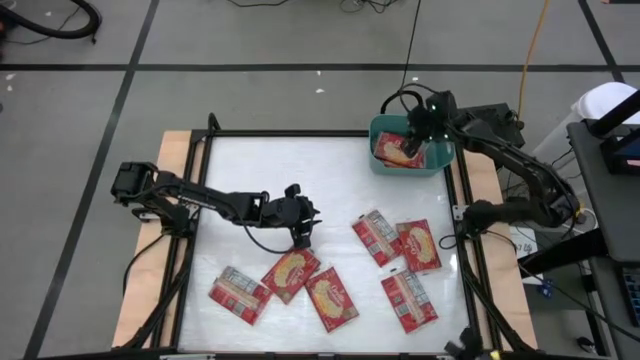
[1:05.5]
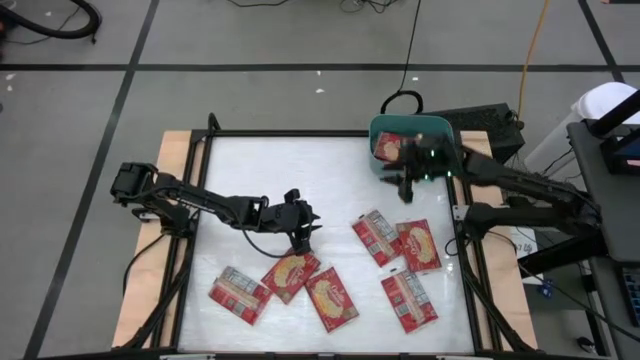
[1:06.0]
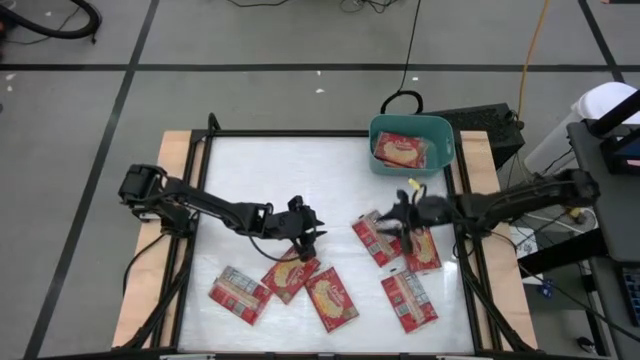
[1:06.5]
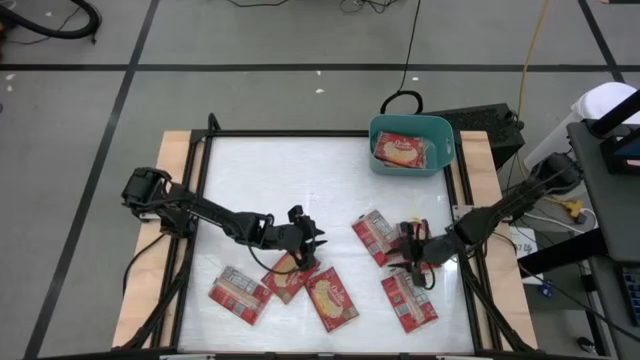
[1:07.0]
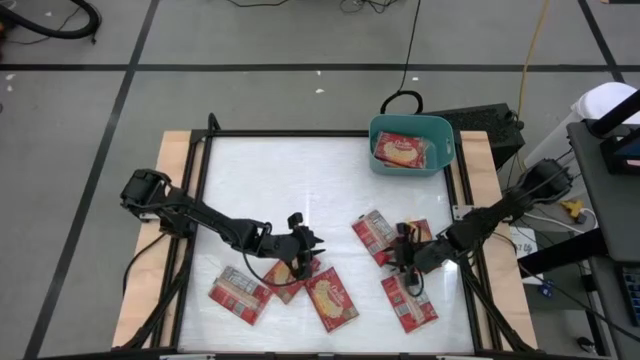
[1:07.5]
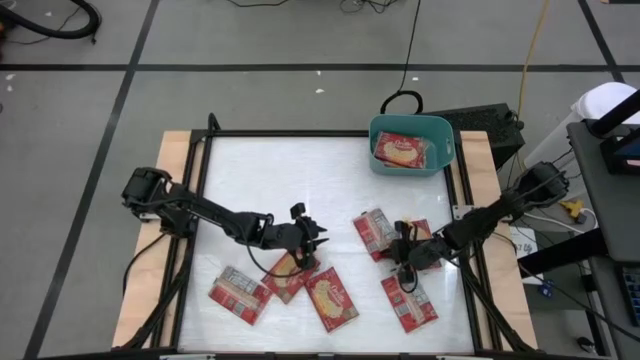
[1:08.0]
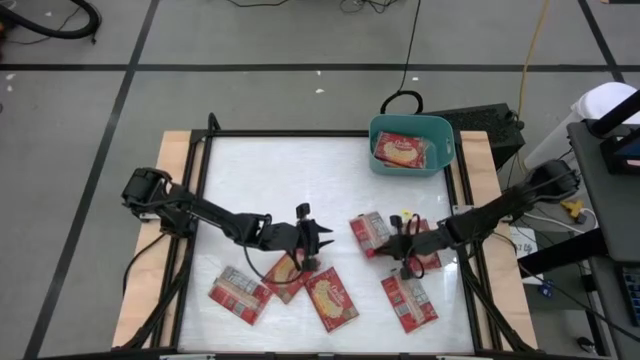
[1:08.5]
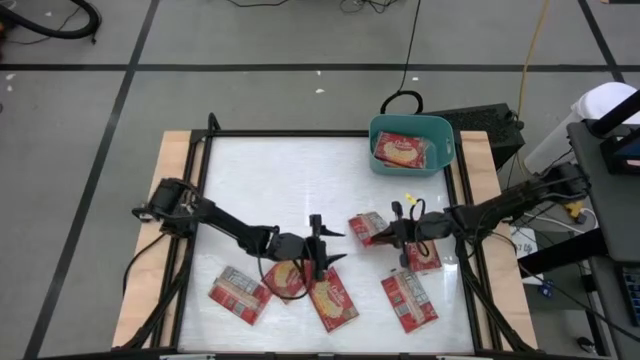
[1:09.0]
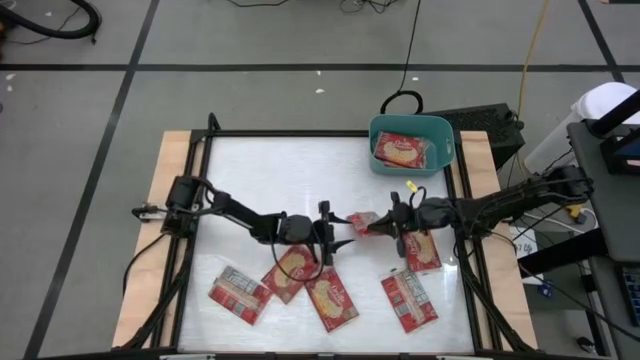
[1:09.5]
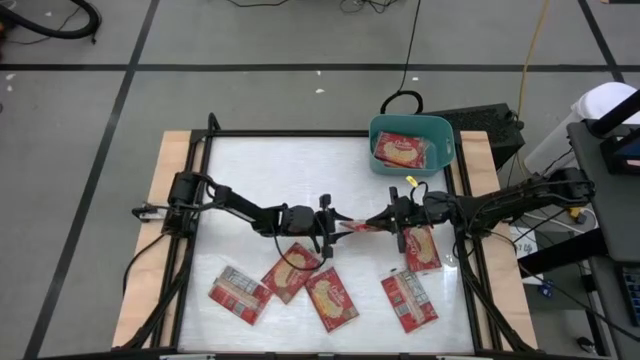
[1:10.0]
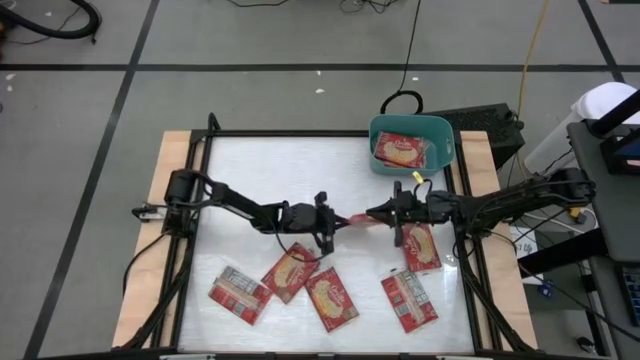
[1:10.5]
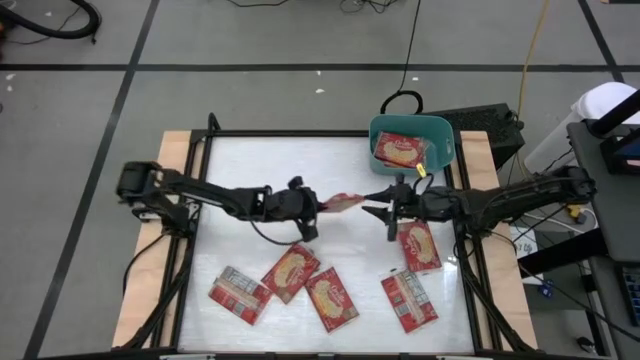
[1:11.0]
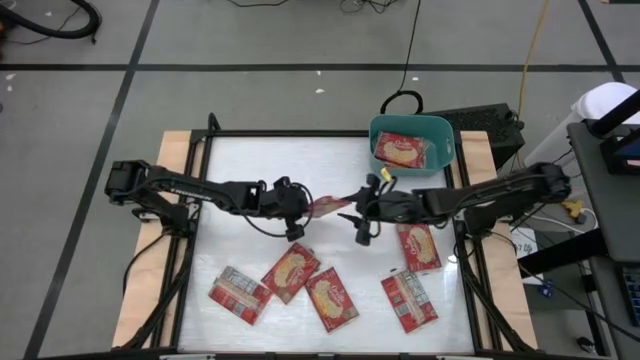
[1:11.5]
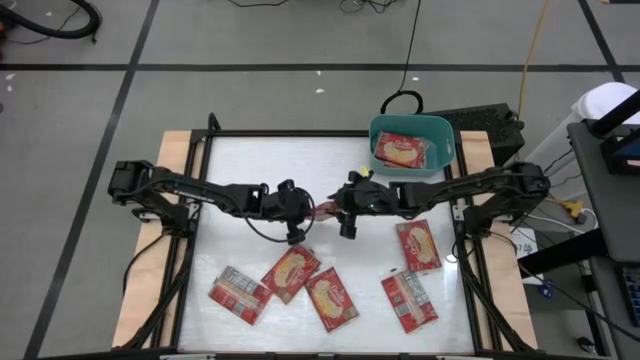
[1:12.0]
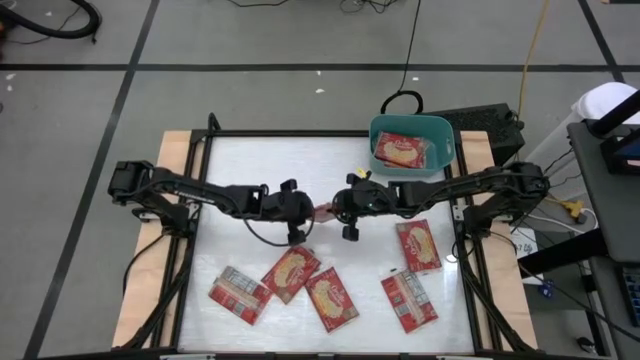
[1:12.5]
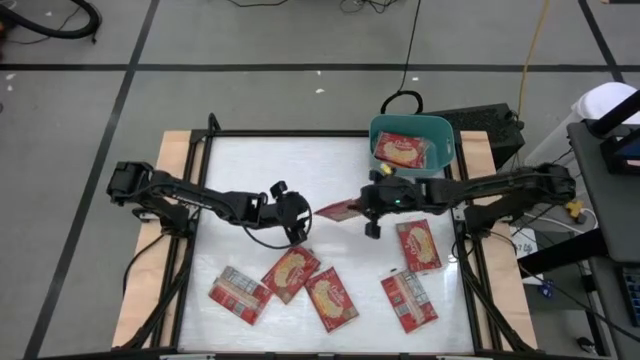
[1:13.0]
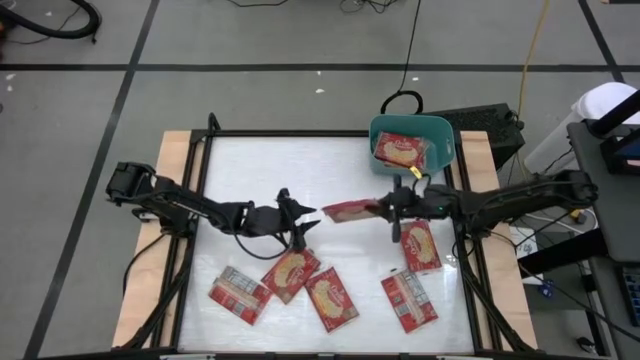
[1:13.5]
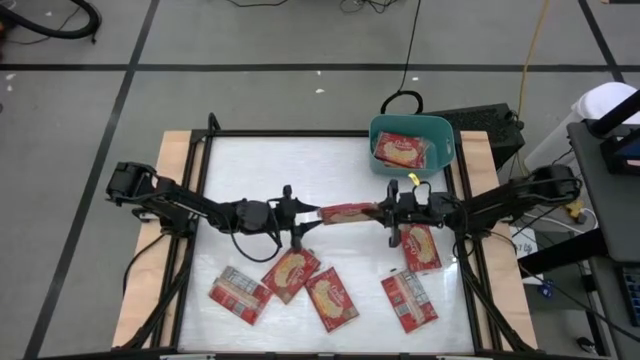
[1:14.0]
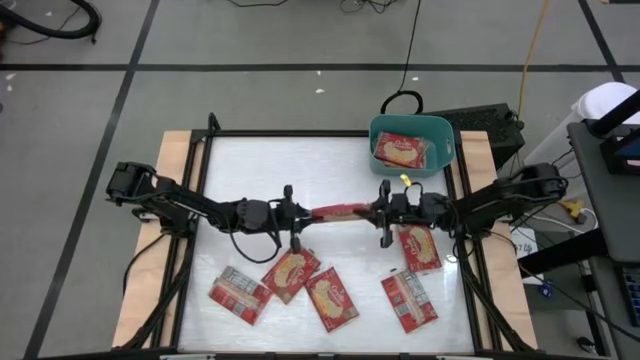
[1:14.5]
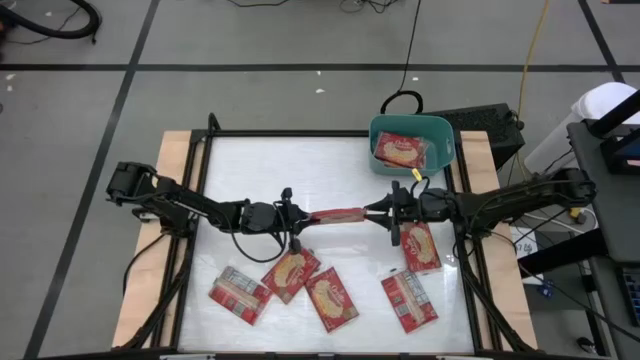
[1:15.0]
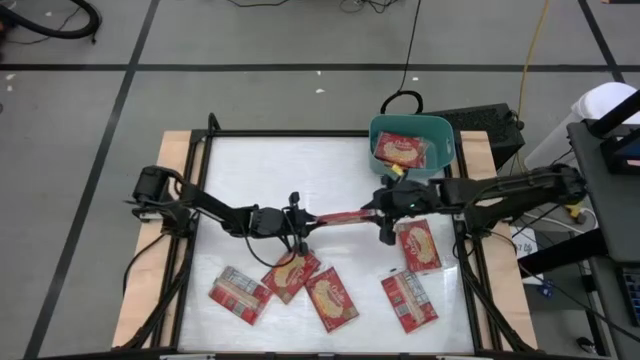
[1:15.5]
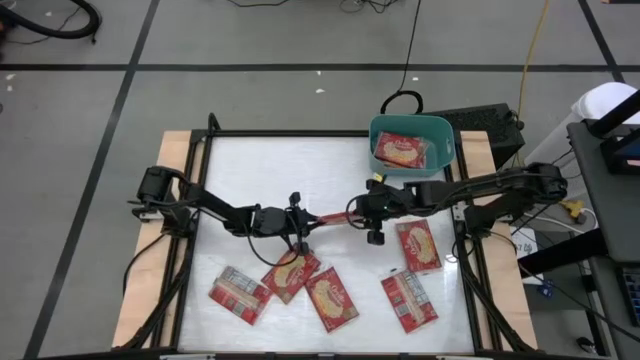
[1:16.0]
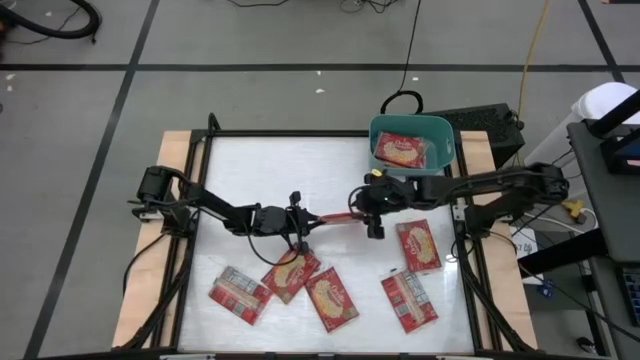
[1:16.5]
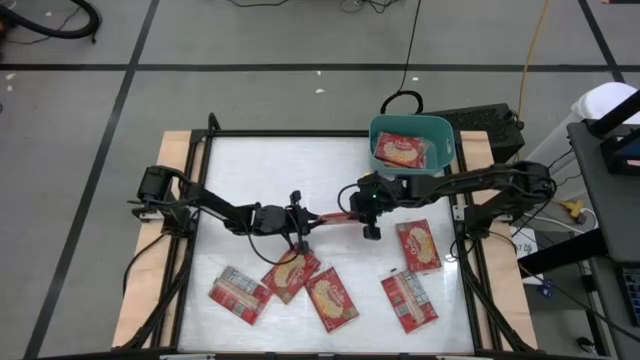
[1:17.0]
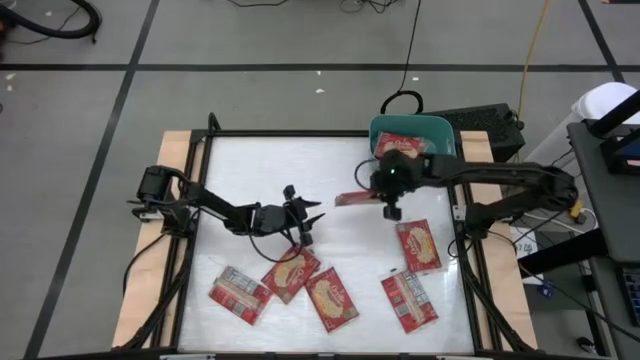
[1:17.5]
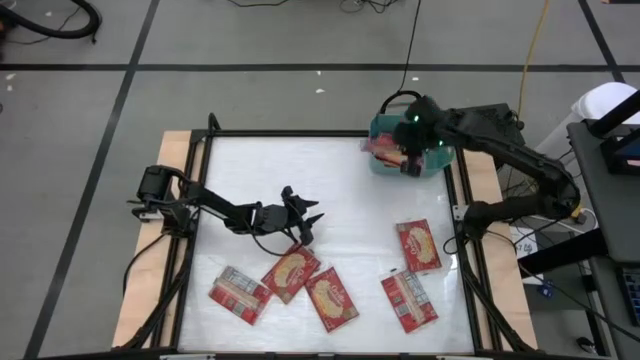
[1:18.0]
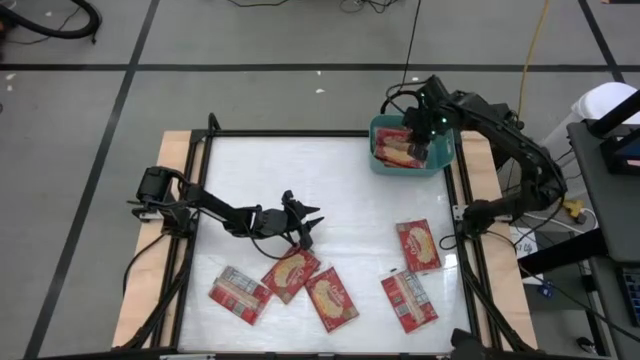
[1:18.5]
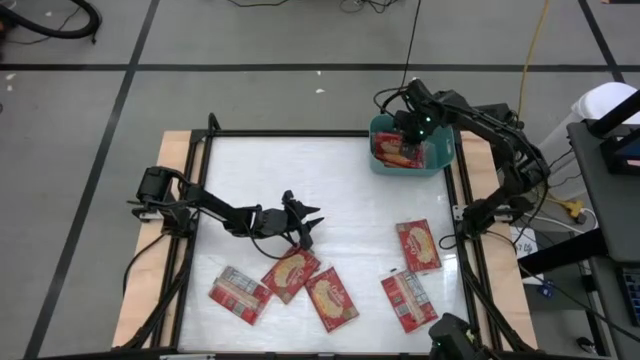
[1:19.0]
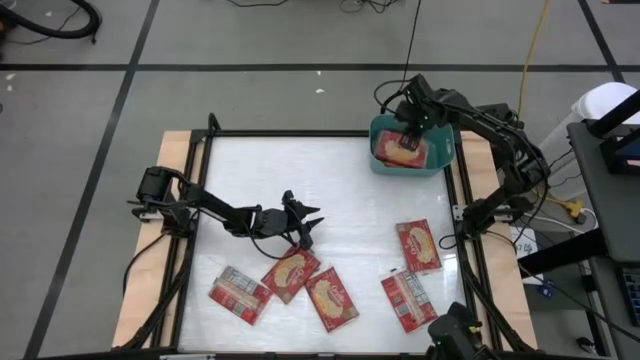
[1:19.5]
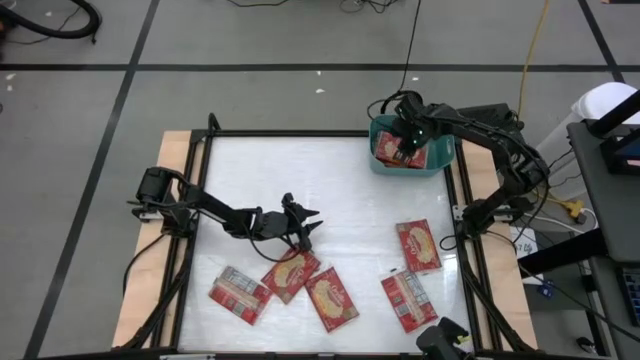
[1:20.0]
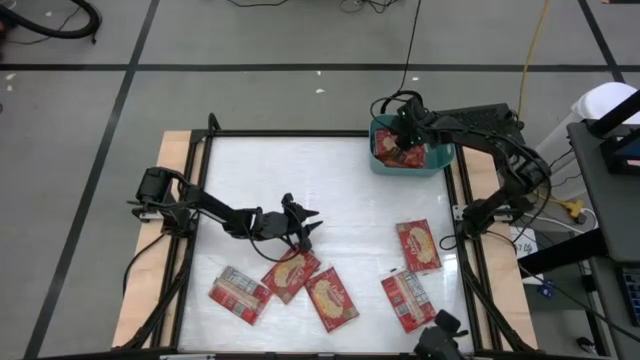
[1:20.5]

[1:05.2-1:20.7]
Task: Sort popcorn bags into baskets
Put the red popcorn bag into the green bin

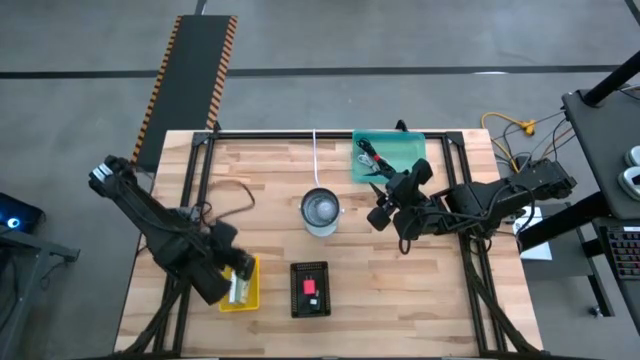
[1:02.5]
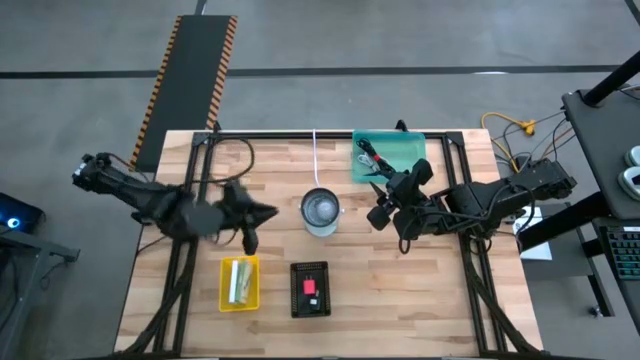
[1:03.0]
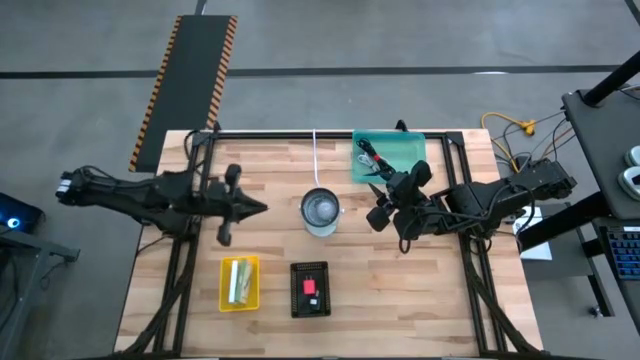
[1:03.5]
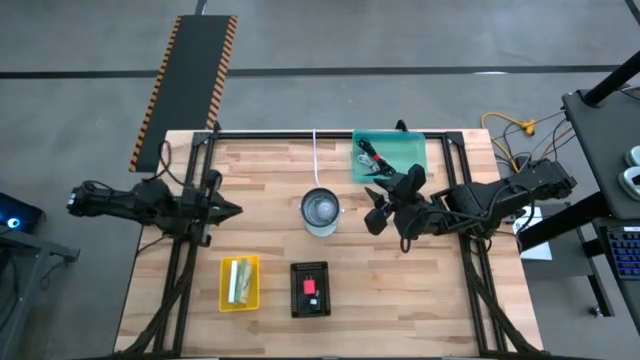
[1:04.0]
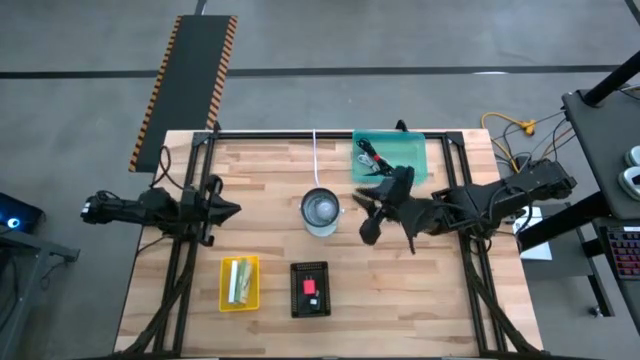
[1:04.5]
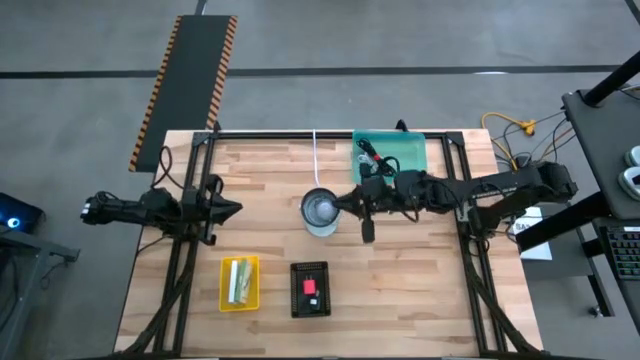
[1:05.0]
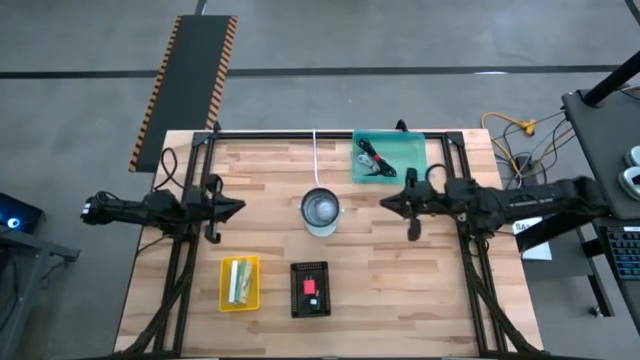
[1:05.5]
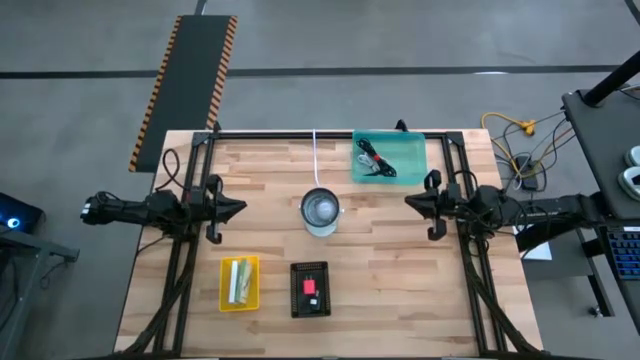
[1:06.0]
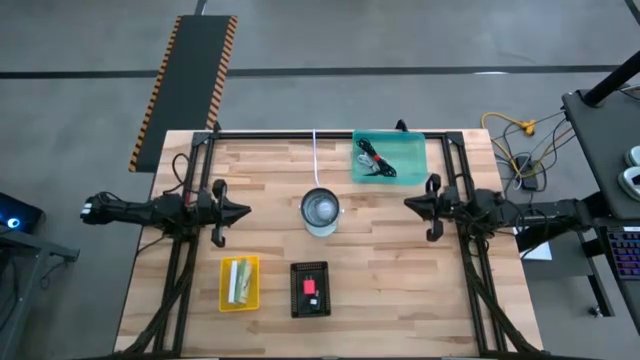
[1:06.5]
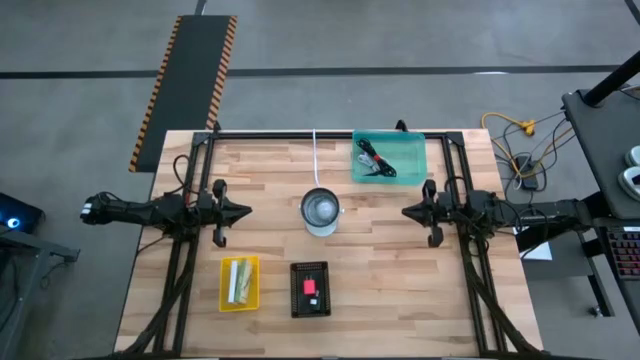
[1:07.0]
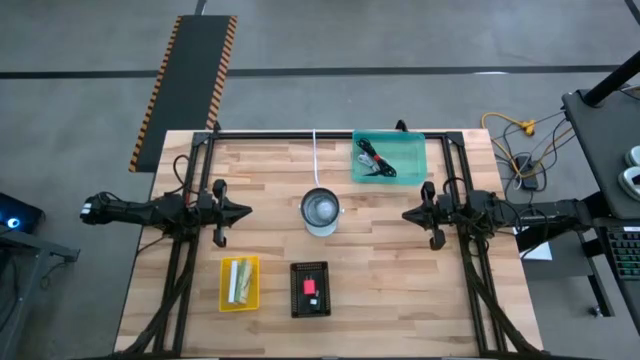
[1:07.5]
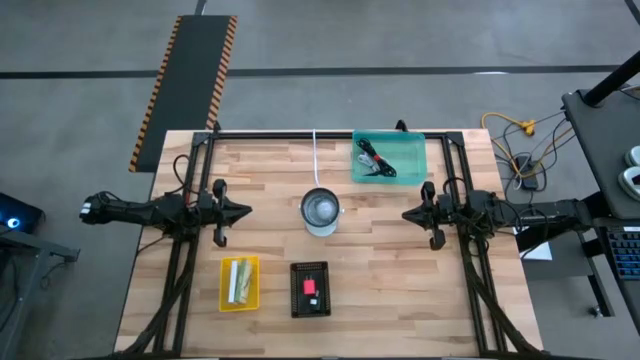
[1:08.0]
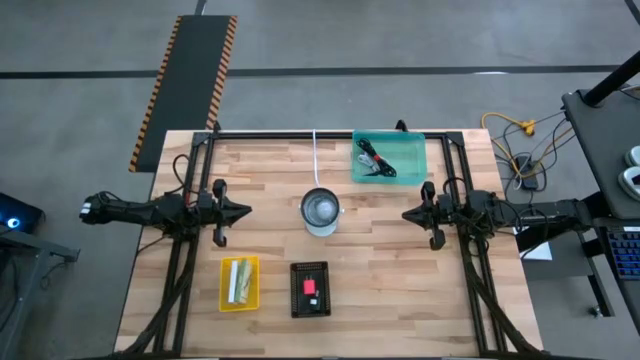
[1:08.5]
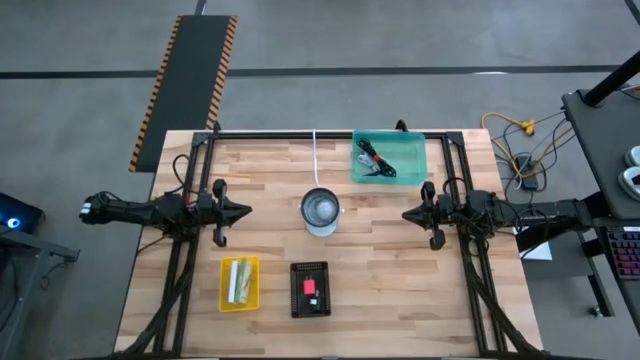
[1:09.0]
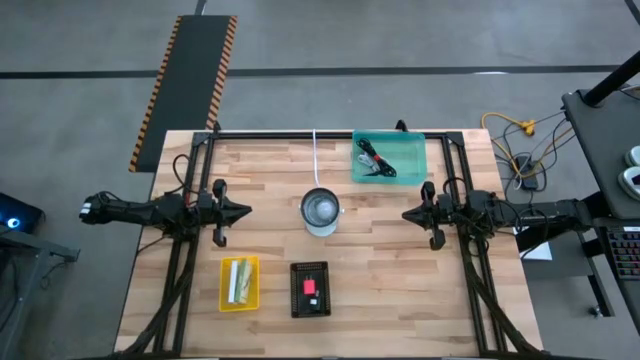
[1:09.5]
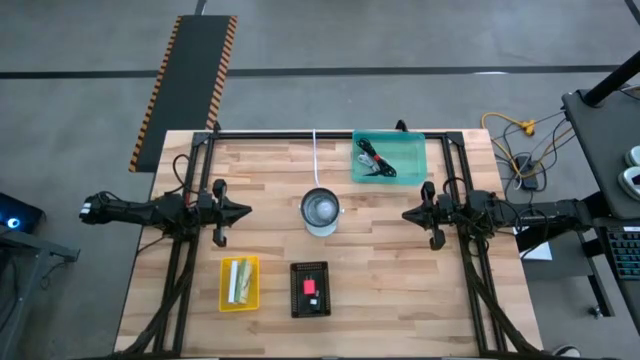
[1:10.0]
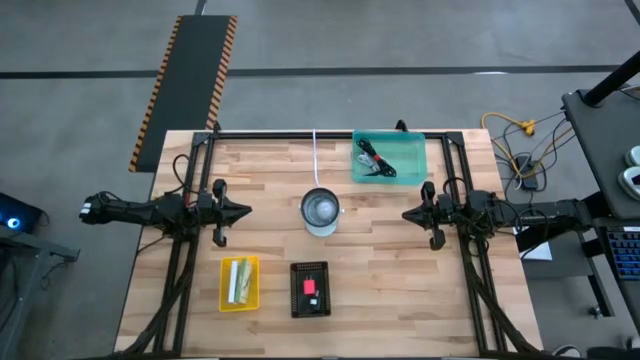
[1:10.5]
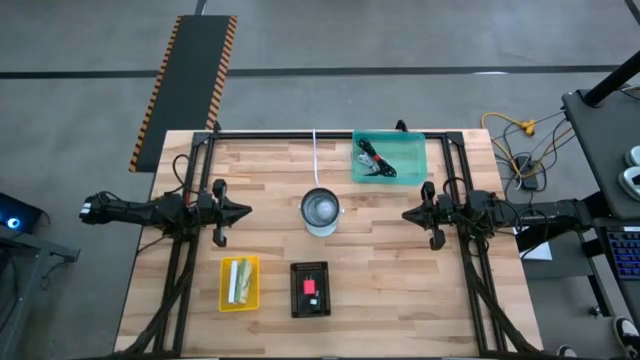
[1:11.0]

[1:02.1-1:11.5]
Task: Pick and place items into bin
Return to Home Position
